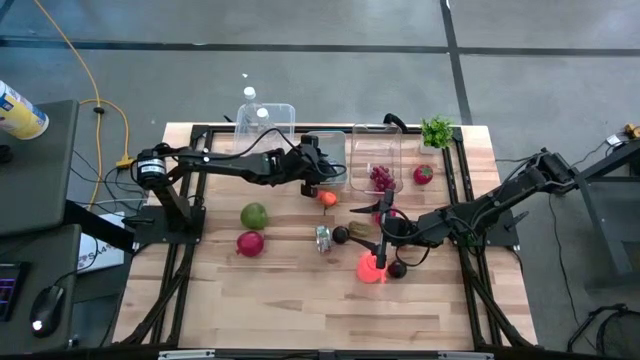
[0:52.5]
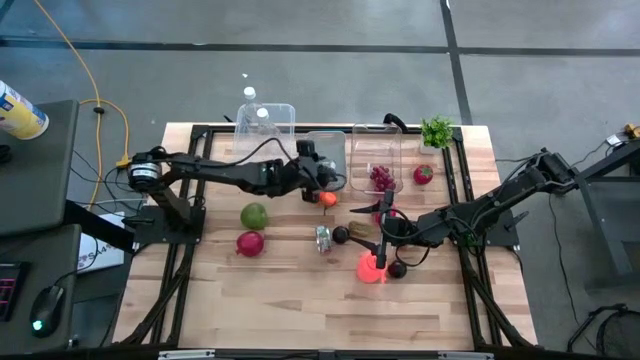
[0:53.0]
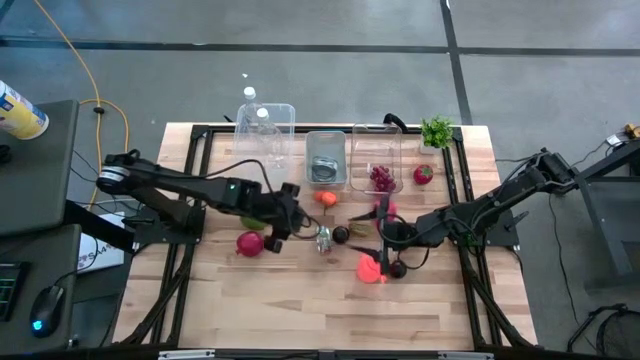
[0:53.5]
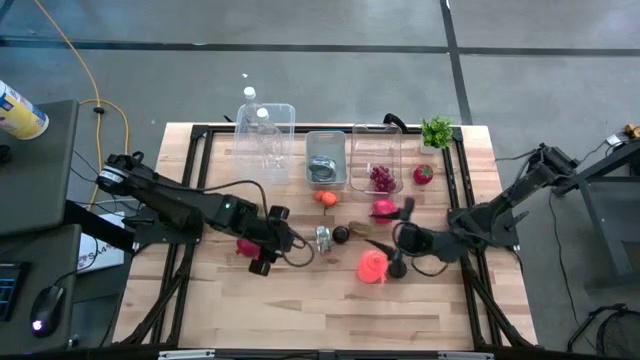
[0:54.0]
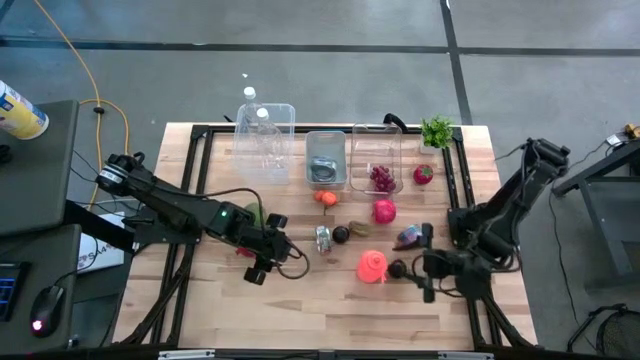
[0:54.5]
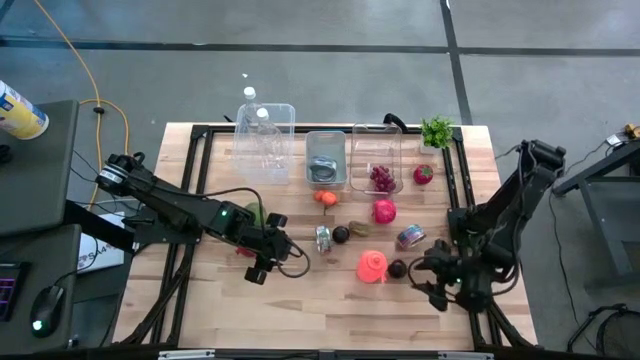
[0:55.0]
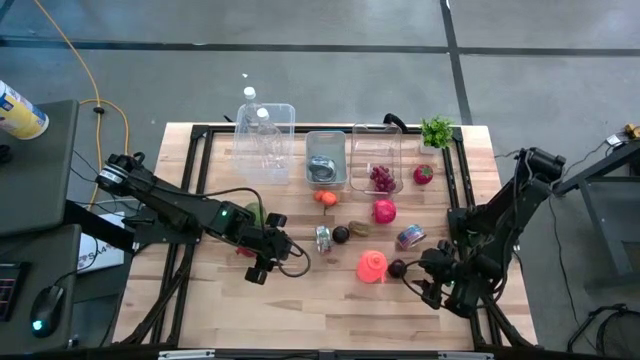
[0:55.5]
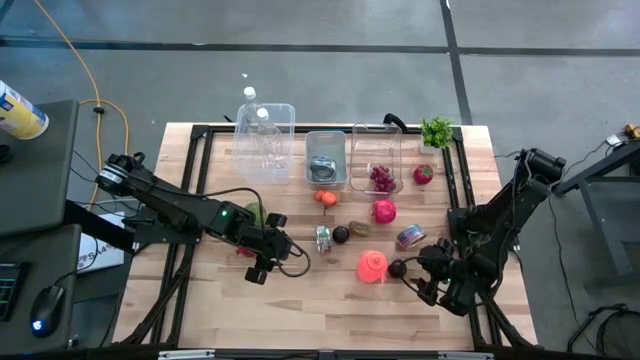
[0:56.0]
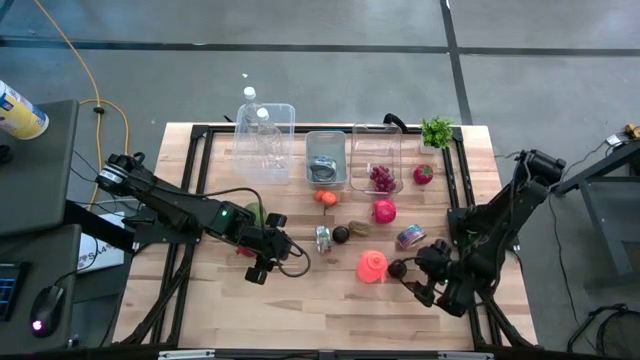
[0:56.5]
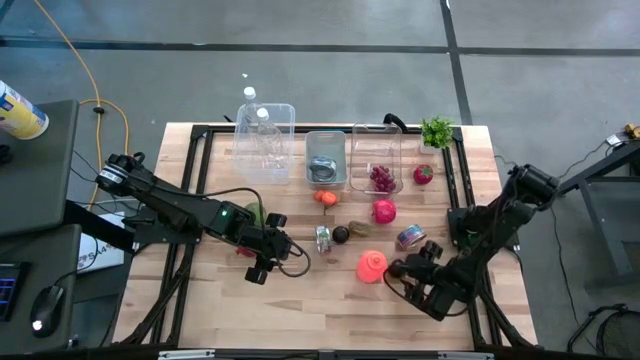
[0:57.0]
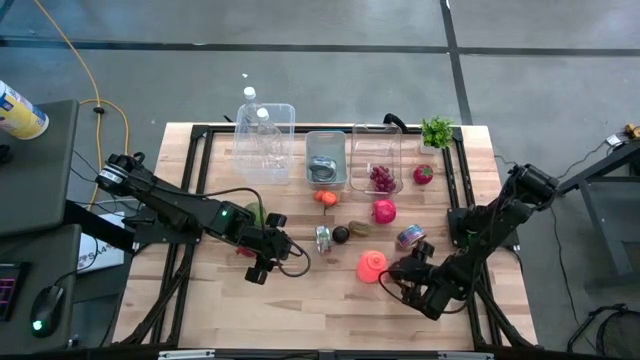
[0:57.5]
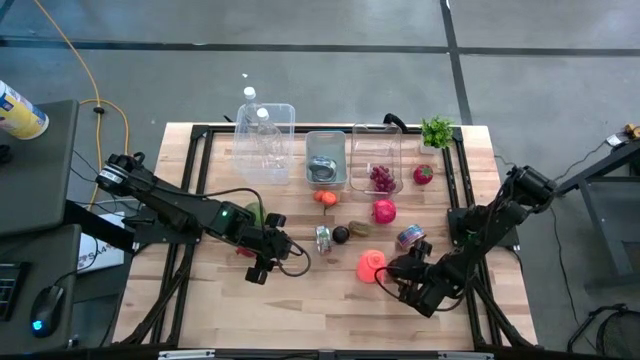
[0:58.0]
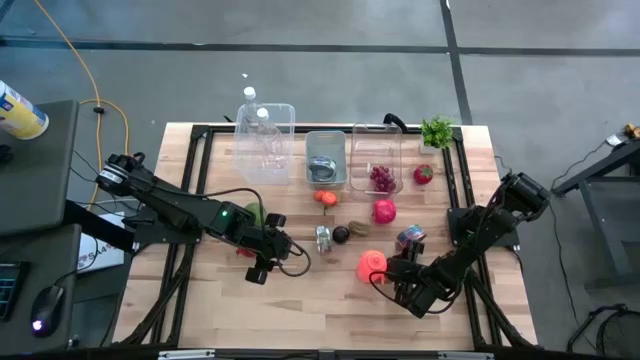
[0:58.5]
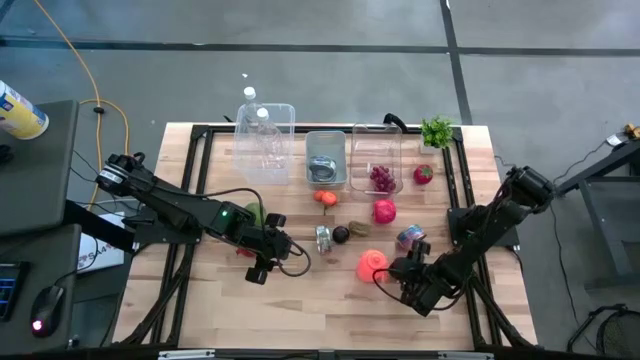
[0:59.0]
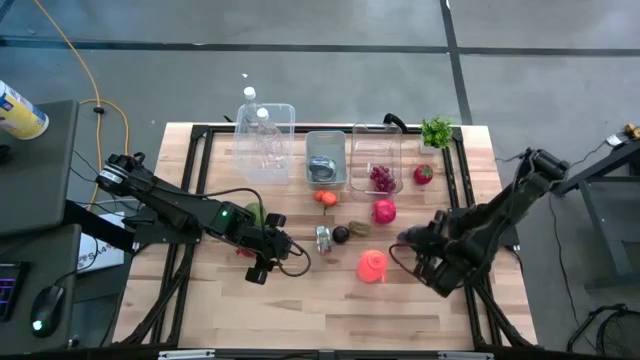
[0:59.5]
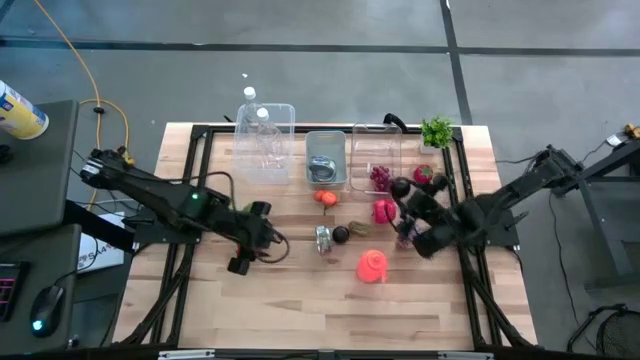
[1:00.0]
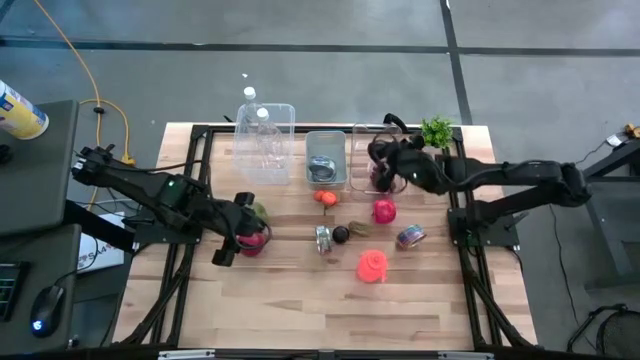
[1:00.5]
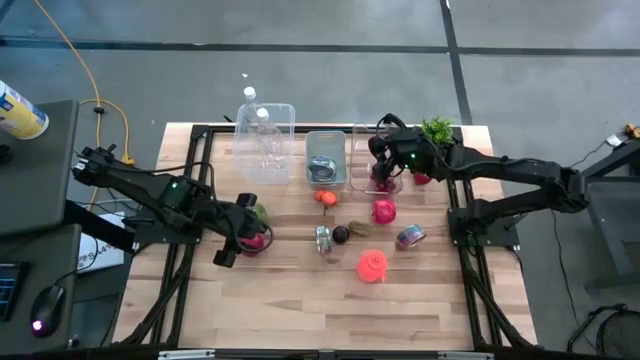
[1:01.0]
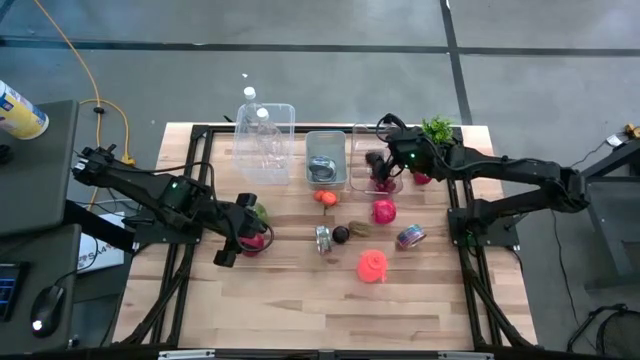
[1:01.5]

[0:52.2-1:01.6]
Task: Pick & Place Food Item
Put the bottom plum into the transparent bin

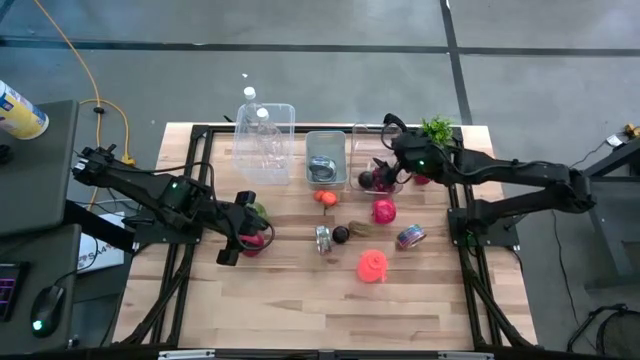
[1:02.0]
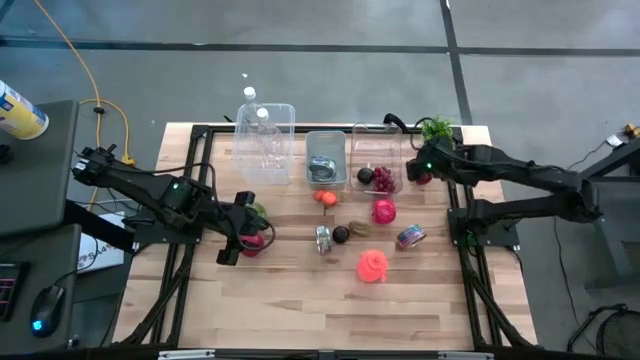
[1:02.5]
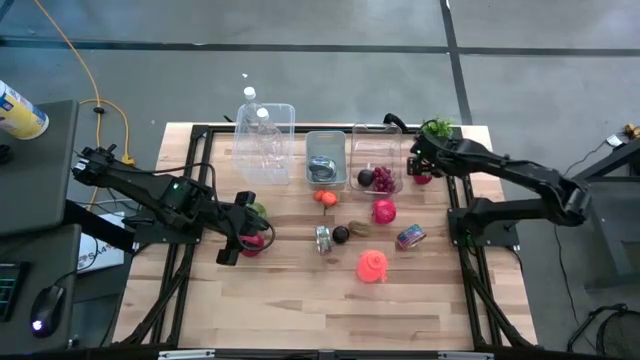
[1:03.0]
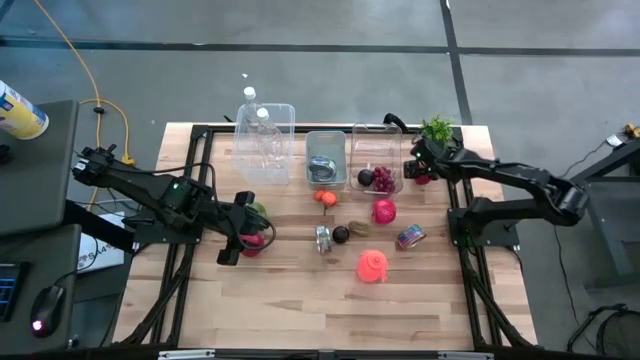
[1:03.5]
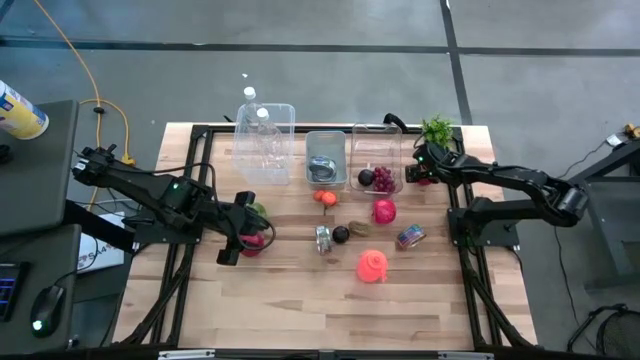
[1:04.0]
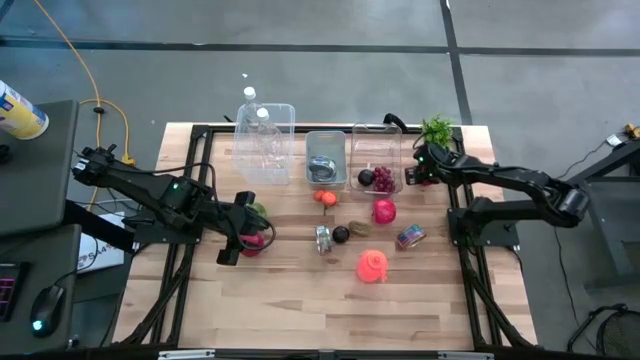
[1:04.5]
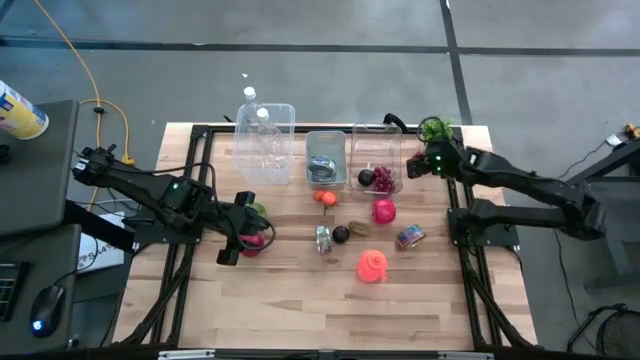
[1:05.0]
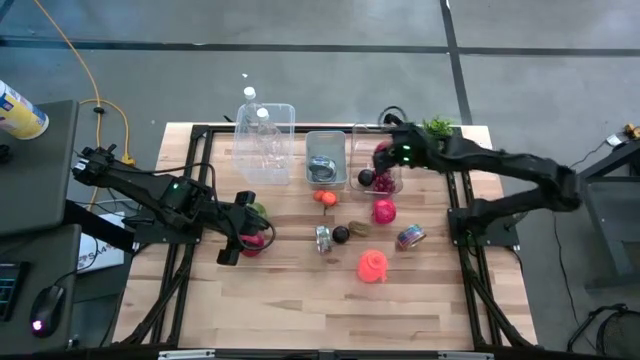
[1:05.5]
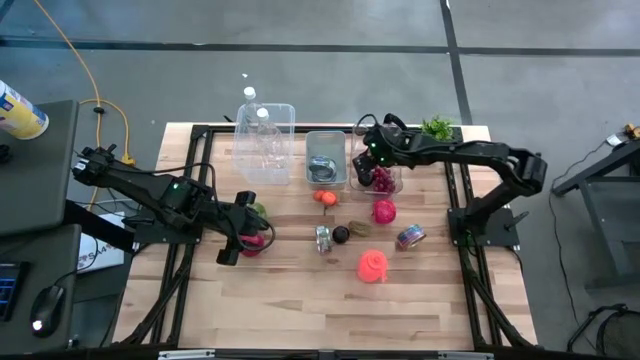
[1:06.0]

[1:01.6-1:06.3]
Put the tomato into the transparent bin

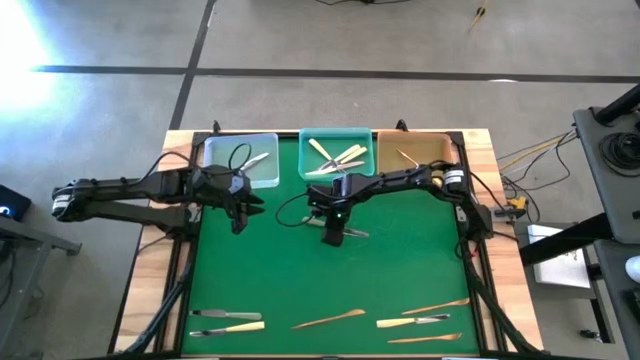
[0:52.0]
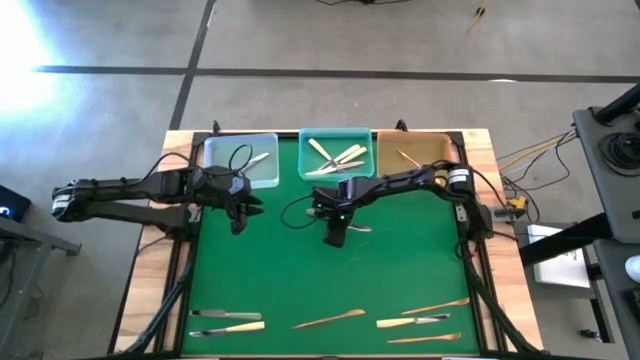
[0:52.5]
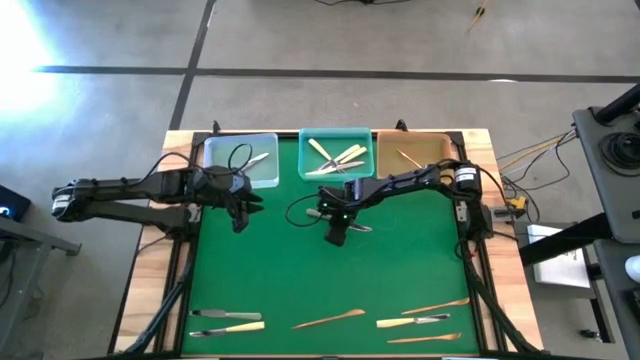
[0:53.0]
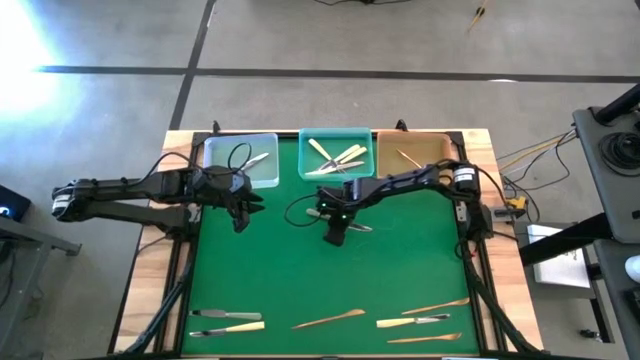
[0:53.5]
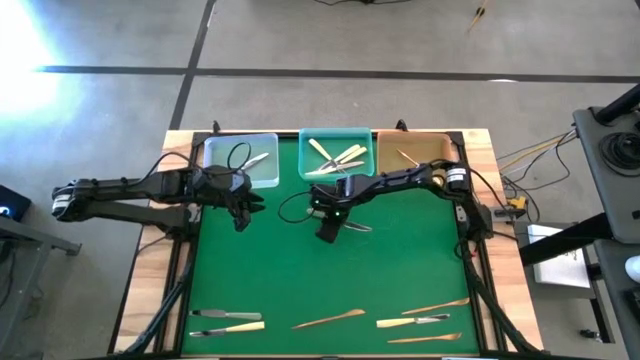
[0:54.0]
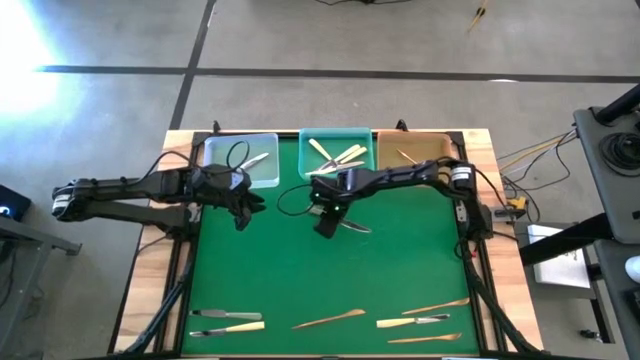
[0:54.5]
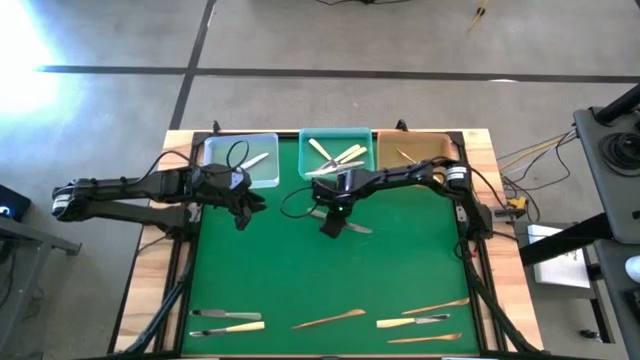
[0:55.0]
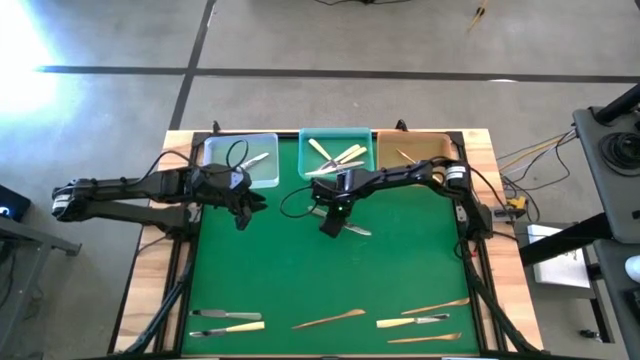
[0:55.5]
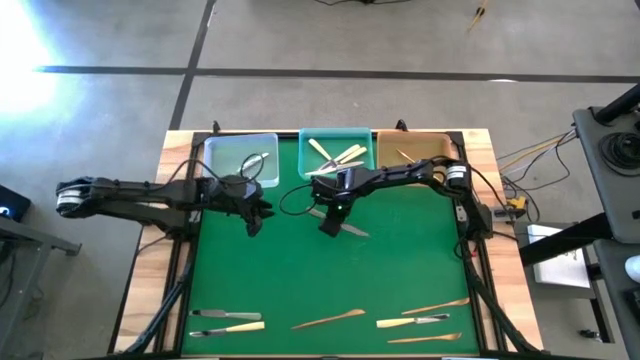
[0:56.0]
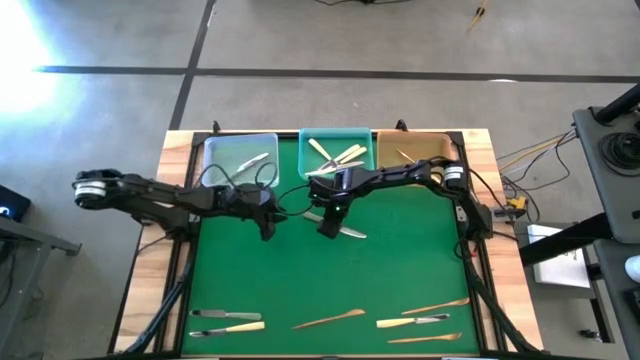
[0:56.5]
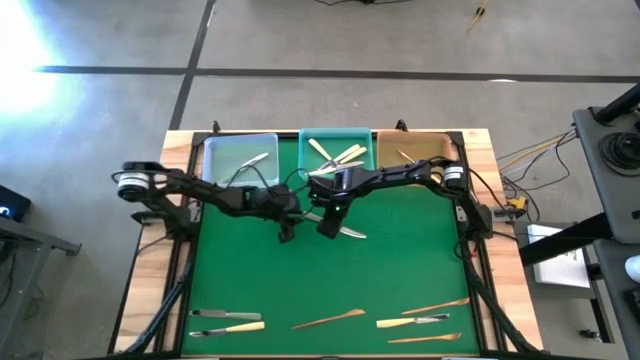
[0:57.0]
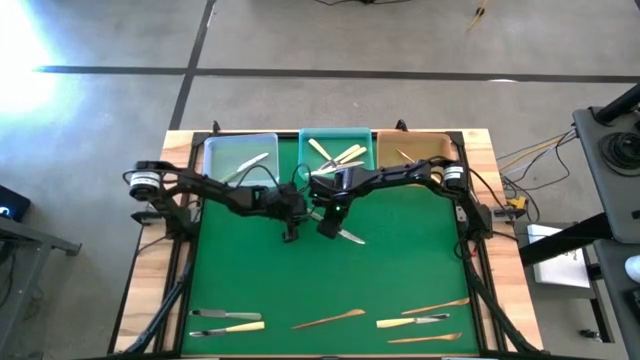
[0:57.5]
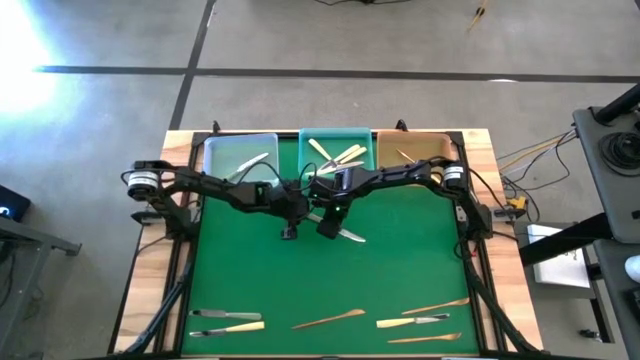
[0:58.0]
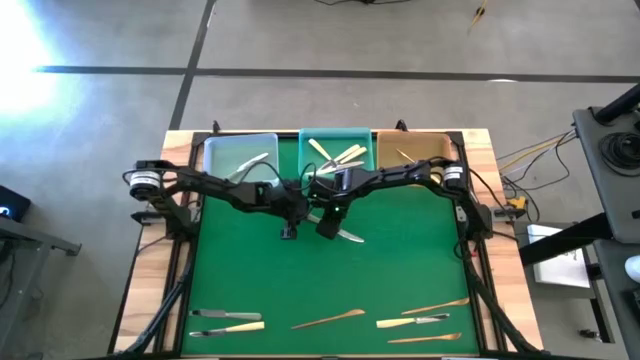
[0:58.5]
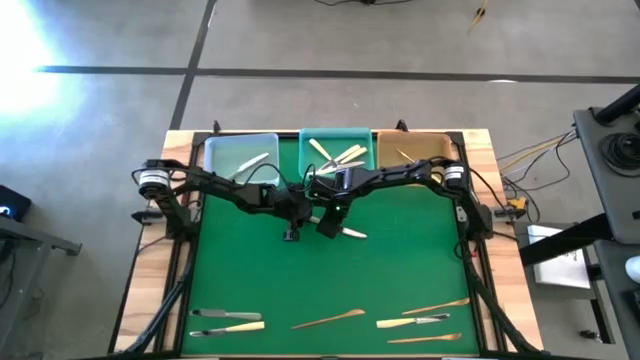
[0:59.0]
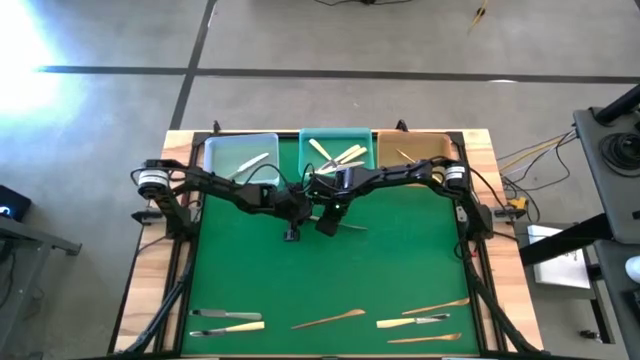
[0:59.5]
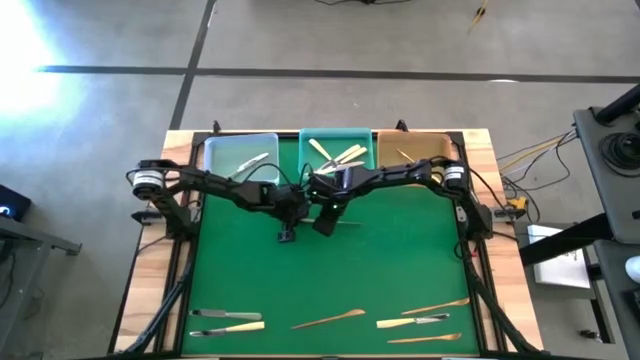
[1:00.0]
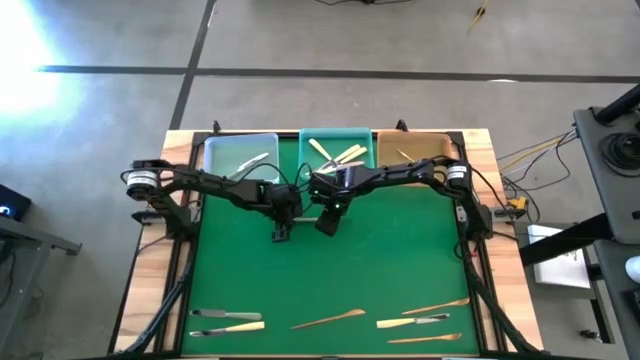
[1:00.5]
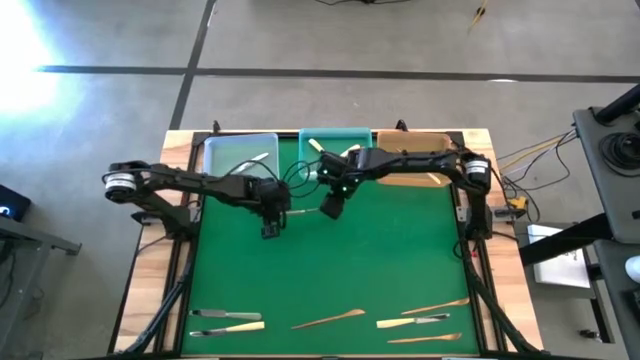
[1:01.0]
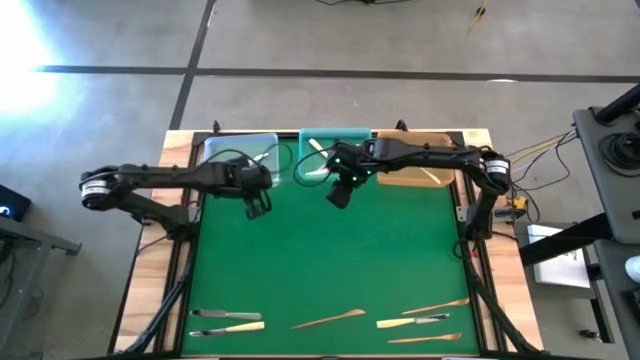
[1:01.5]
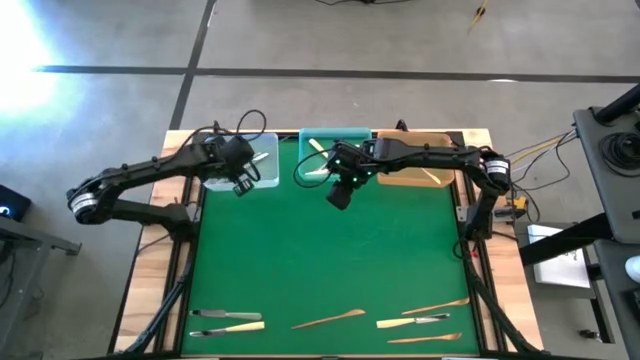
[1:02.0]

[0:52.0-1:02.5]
Task: Sort silverware by color (type)
Put the top silver knife into the transparent bin
